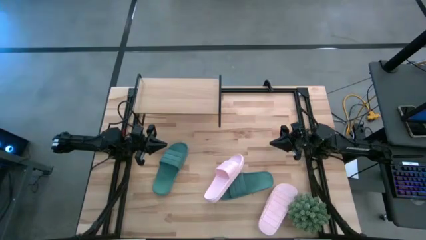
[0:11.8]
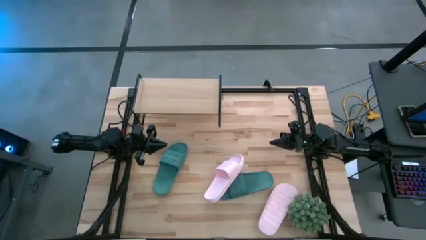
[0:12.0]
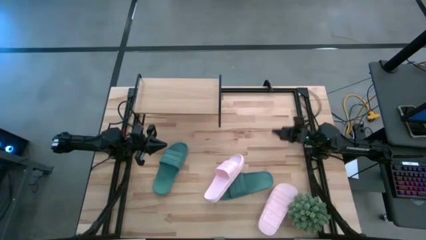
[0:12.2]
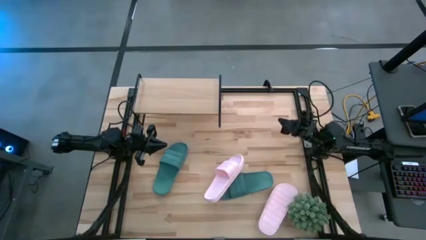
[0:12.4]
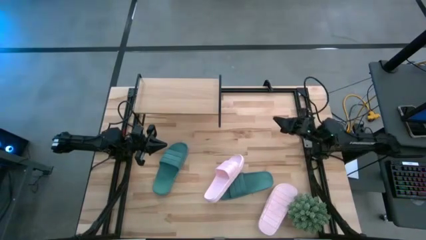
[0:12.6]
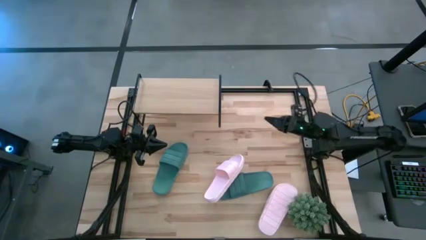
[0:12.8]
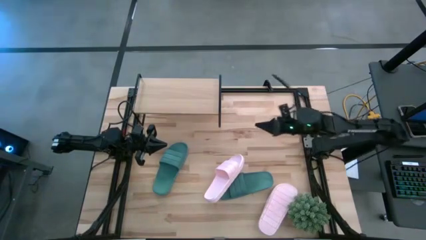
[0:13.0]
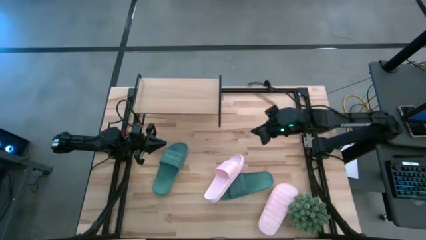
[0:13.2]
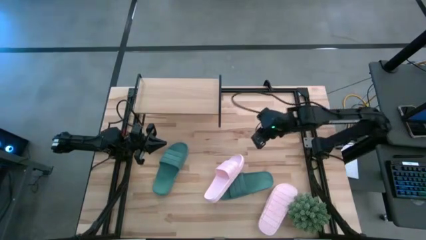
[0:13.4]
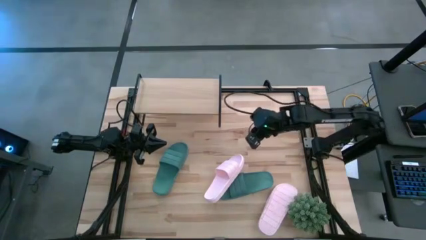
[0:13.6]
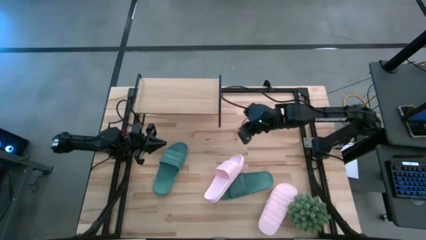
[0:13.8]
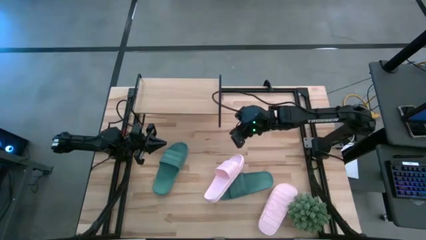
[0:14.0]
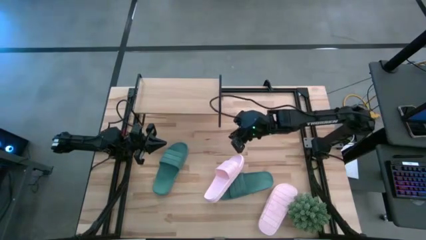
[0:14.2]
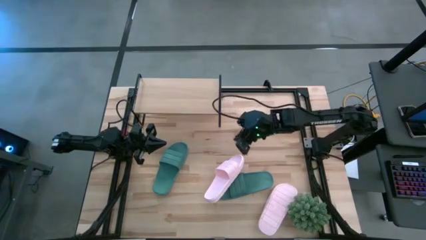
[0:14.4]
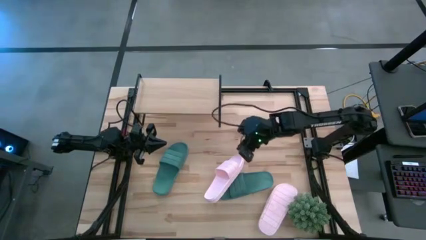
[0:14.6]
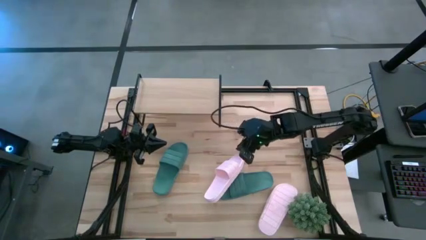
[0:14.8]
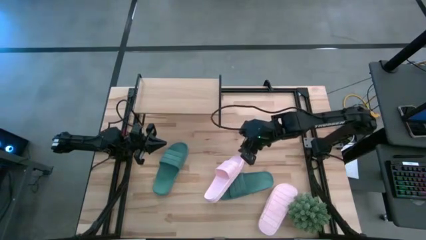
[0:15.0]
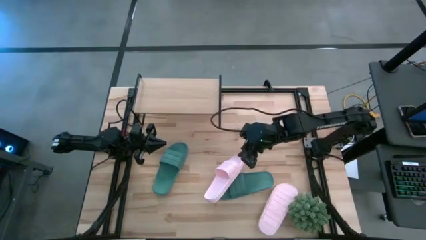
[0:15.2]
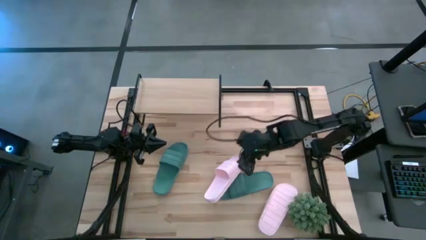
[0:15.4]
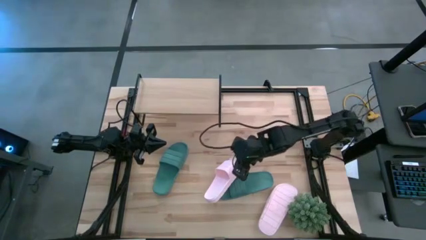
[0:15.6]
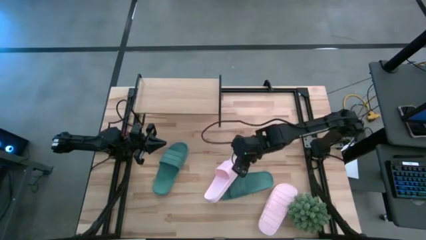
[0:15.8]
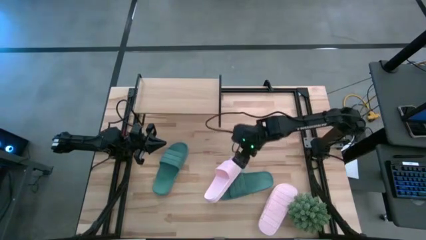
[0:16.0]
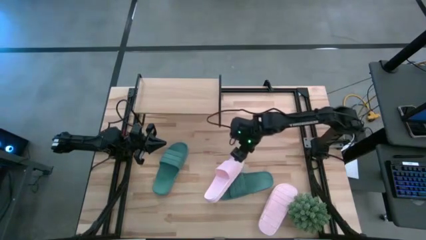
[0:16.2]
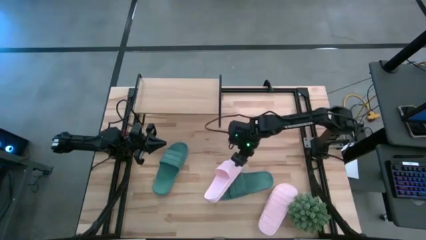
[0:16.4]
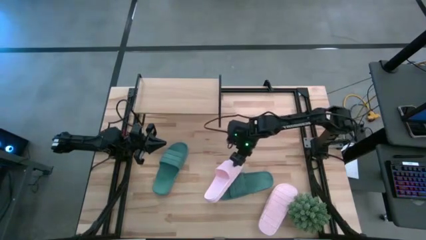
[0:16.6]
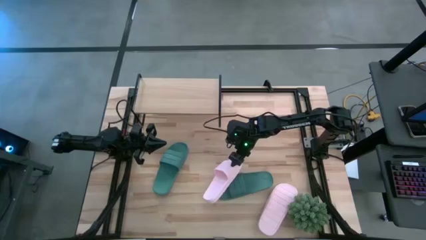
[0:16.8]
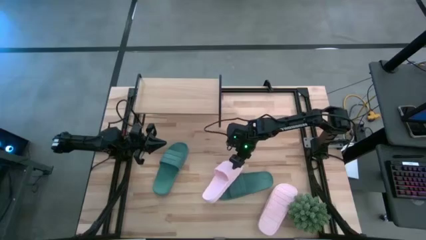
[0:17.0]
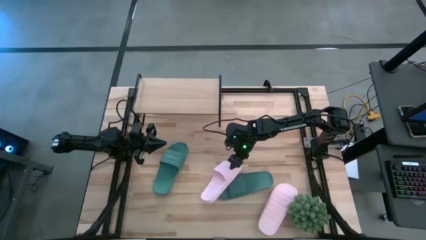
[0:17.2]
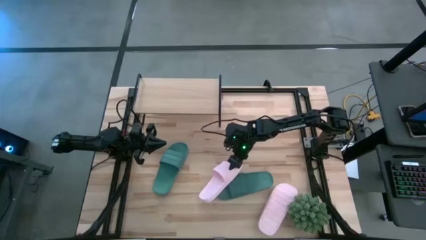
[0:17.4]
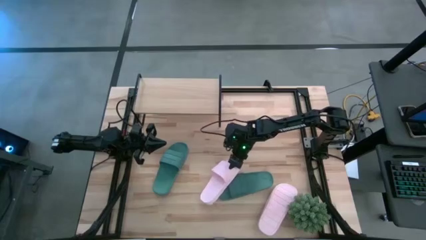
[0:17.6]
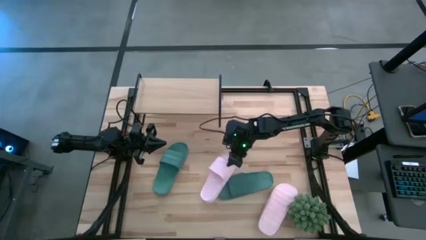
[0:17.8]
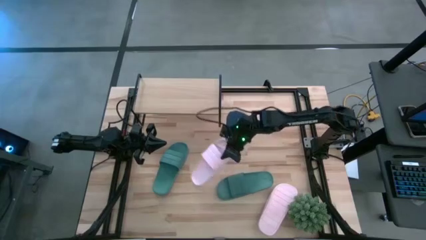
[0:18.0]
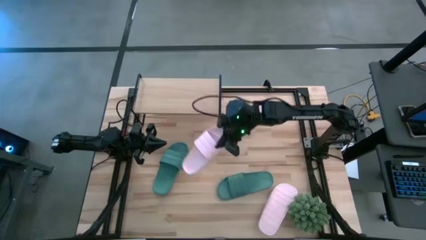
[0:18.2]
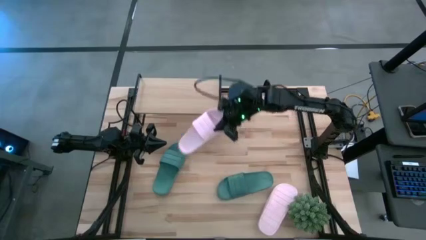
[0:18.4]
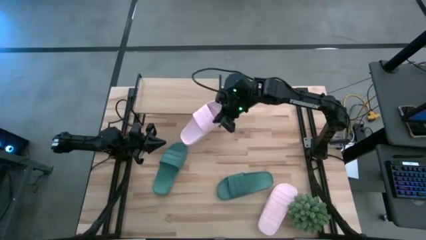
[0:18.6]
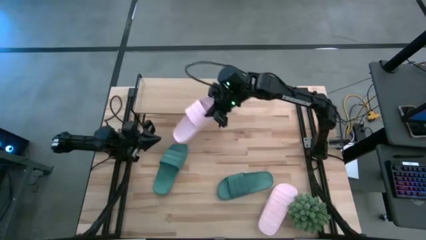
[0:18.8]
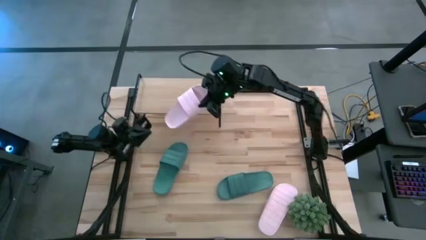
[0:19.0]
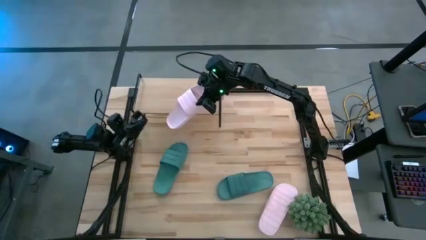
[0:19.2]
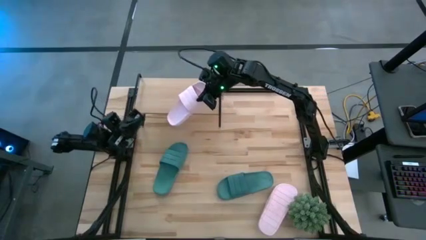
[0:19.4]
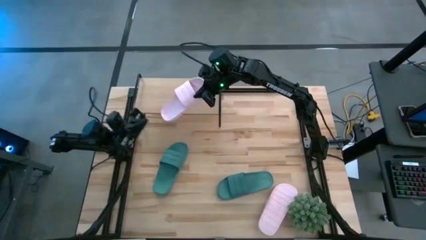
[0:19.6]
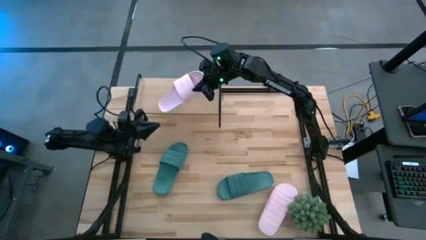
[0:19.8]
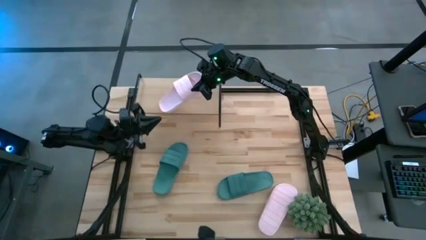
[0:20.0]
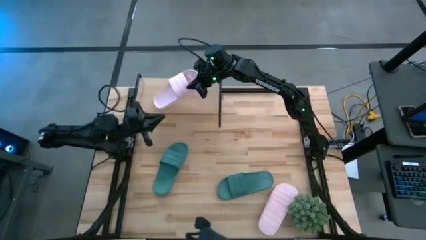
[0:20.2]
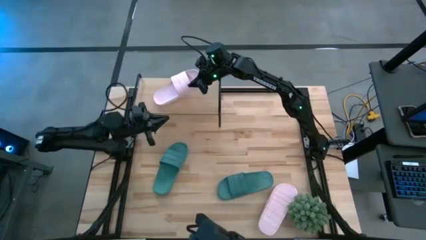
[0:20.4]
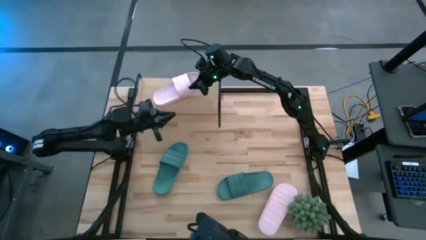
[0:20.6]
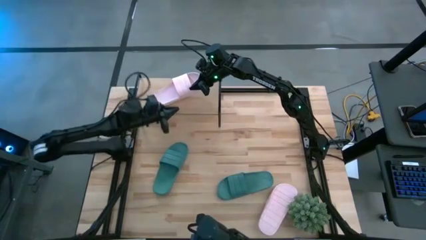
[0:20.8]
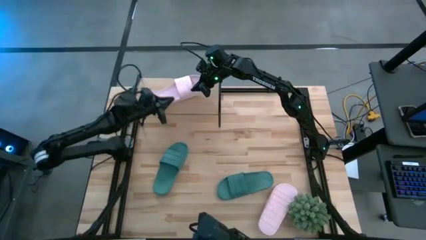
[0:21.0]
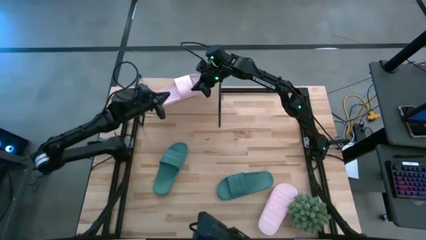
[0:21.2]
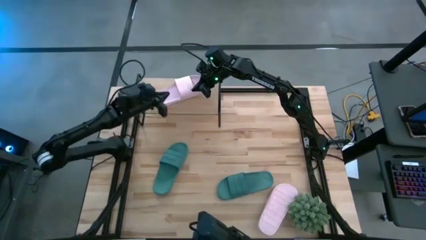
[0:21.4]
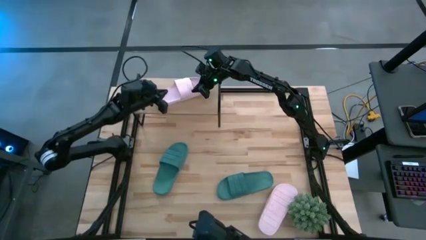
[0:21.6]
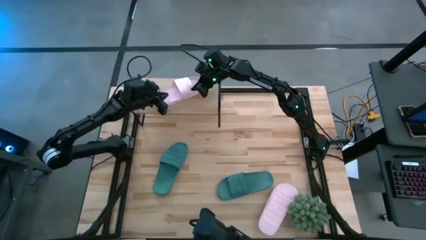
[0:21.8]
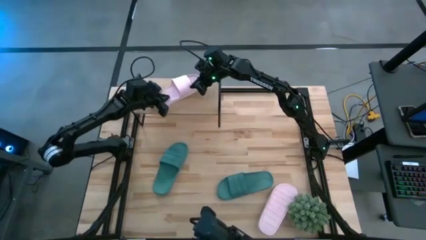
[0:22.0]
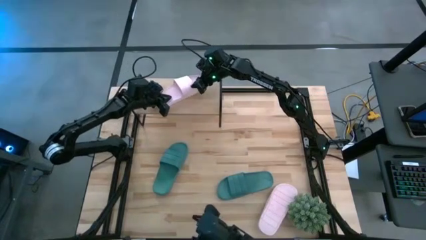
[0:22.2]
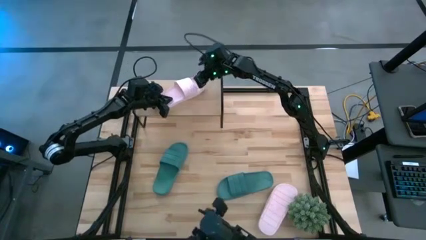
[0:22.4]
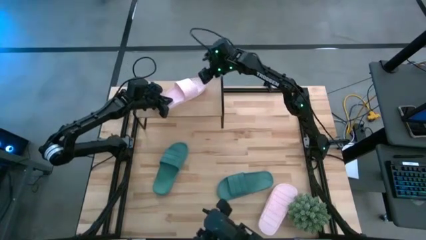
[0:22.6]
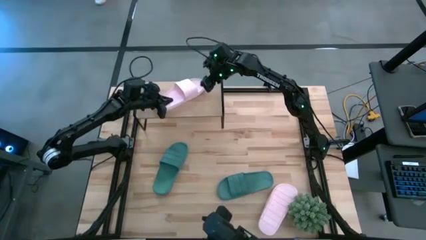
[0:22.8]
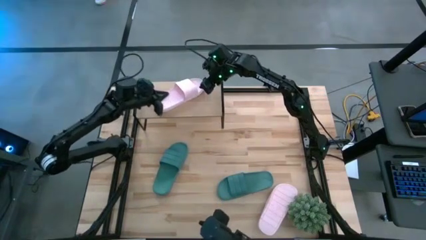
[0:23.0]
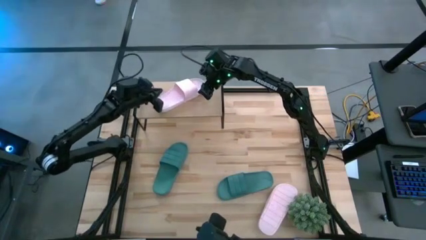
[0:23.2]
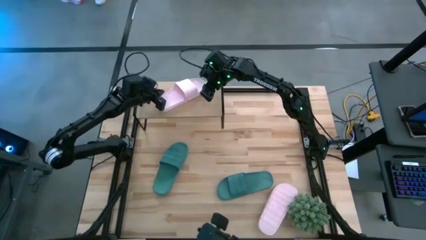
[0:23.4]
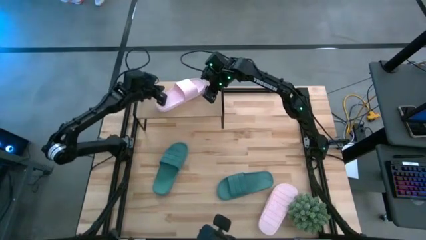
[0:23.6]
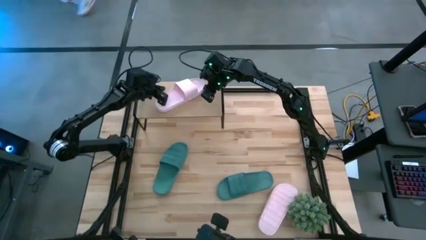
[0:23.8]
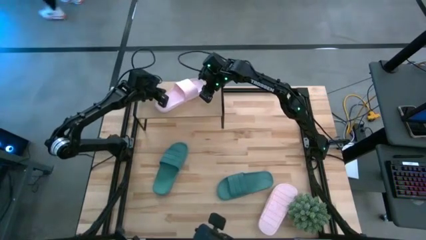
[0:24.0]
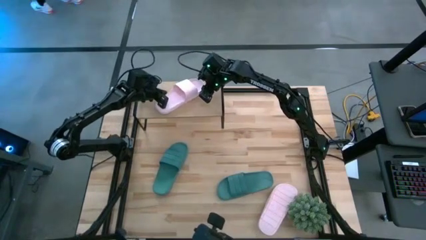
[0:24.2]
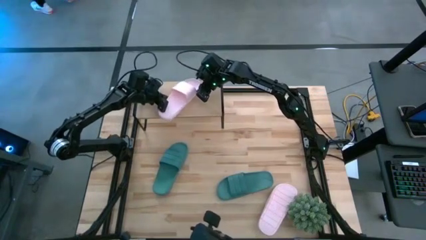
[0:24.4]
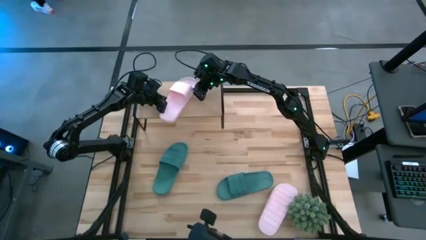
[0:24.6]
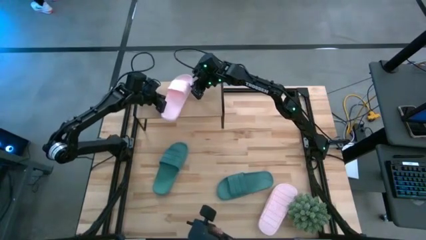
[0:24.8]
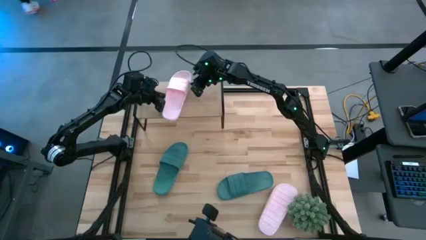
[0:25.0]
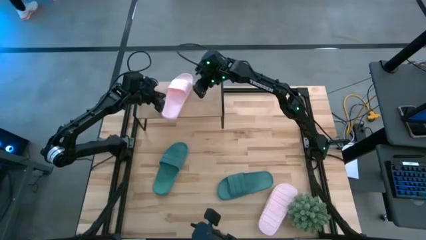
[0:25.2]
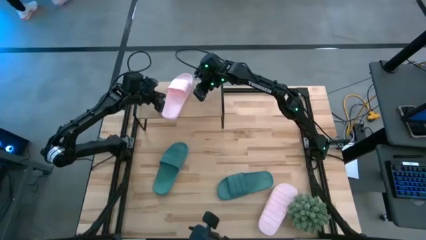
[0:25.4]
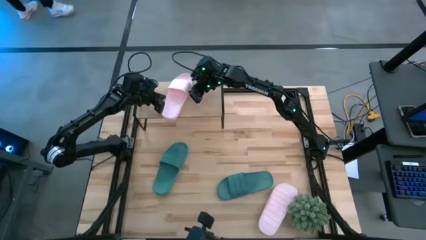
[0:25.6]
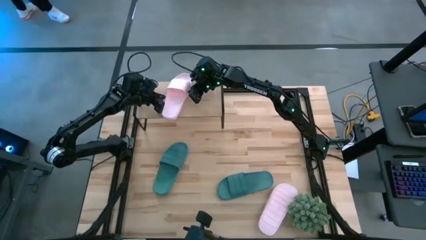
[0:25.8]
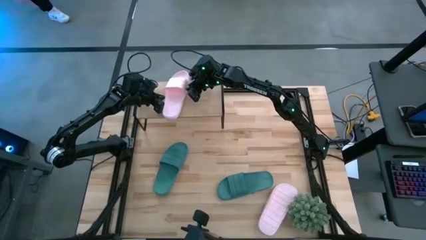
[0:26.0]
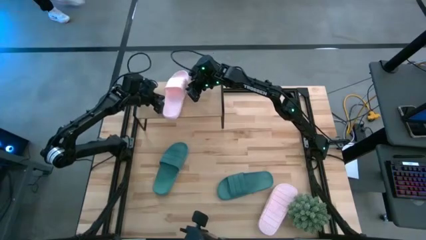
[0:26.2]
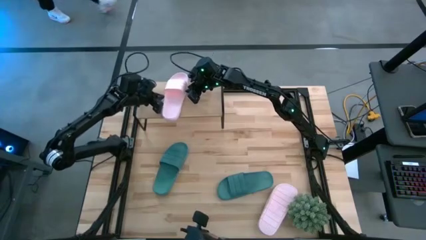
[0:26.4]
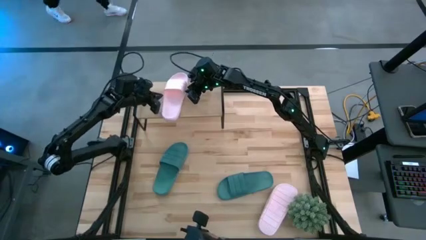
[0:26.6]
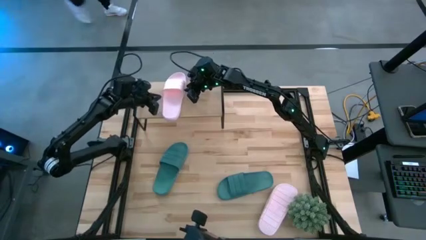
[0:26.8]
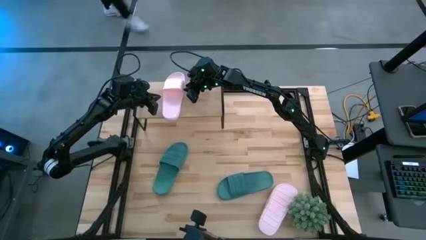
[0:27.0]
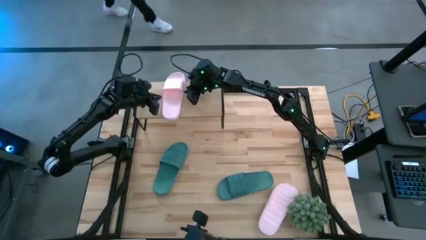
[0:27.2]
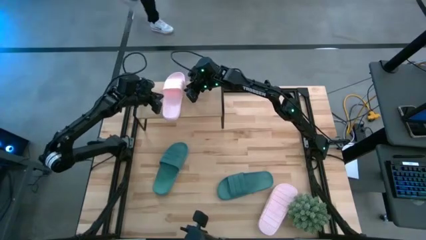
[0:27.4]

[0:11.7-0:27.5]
Task: Pick and place slides into the shelf
Put the left pink slide on the shelf
